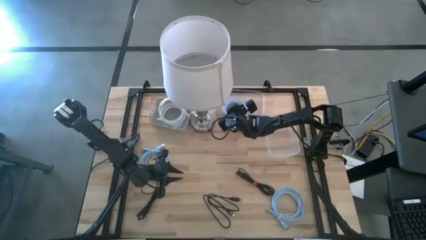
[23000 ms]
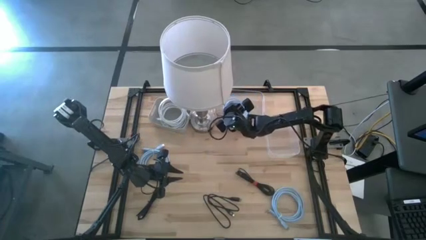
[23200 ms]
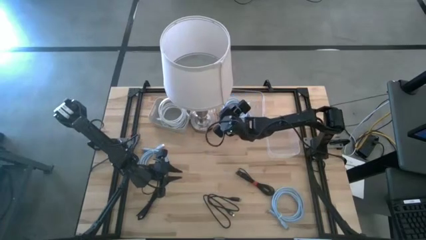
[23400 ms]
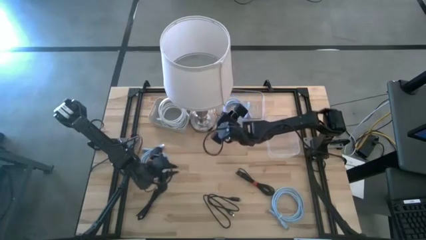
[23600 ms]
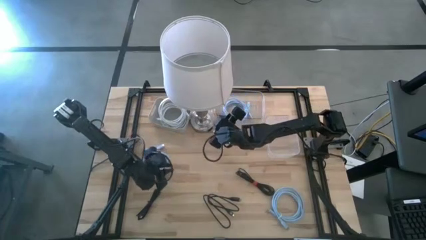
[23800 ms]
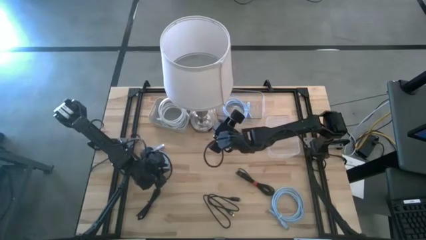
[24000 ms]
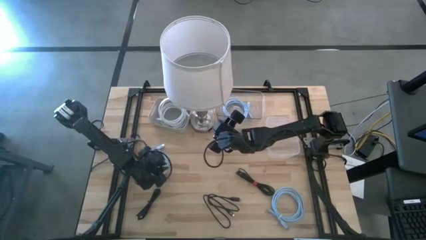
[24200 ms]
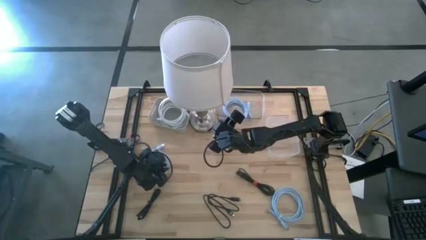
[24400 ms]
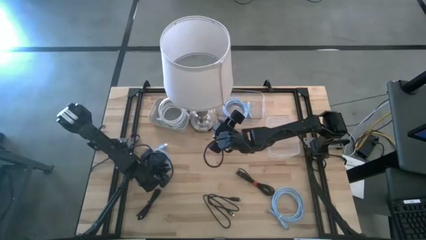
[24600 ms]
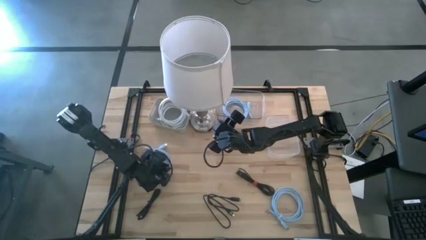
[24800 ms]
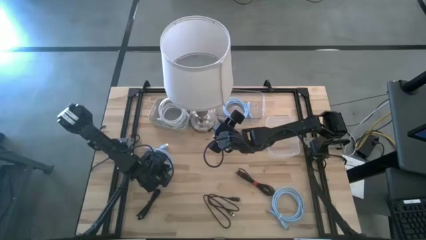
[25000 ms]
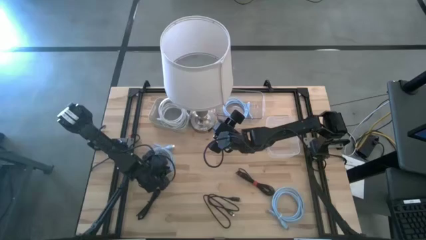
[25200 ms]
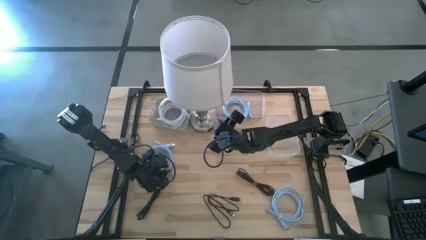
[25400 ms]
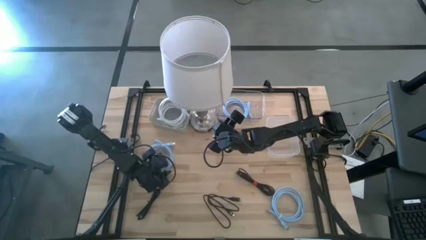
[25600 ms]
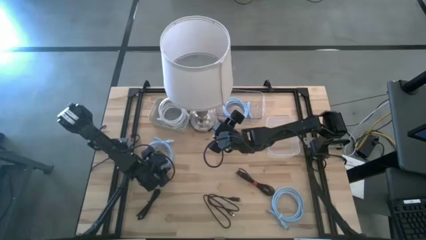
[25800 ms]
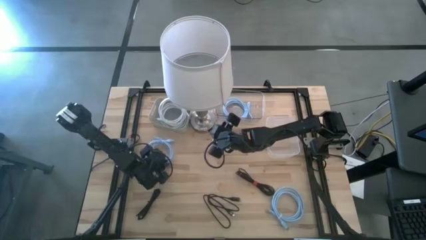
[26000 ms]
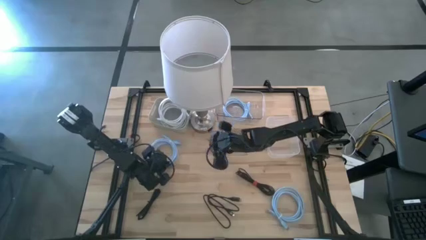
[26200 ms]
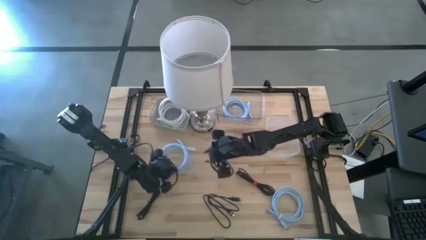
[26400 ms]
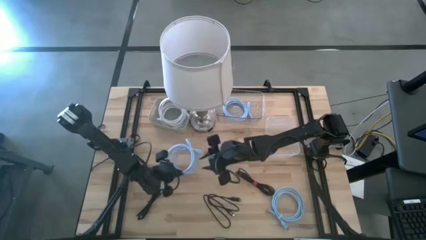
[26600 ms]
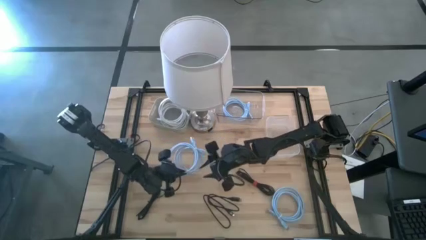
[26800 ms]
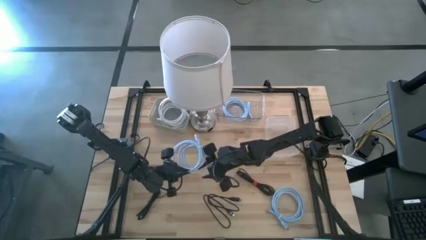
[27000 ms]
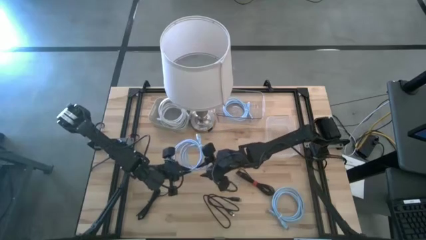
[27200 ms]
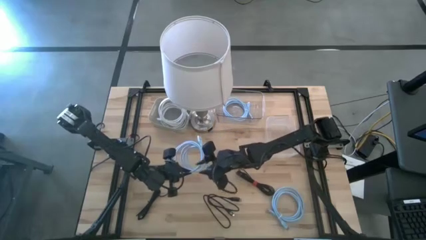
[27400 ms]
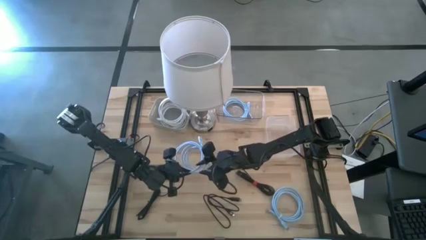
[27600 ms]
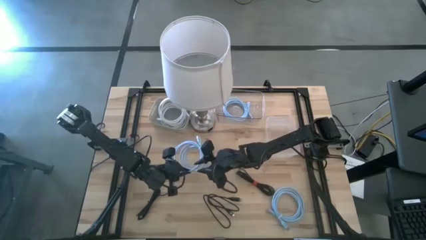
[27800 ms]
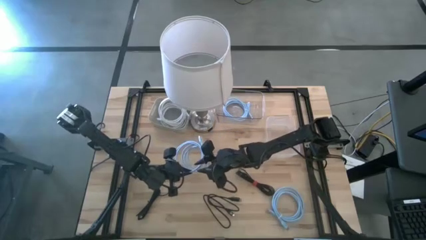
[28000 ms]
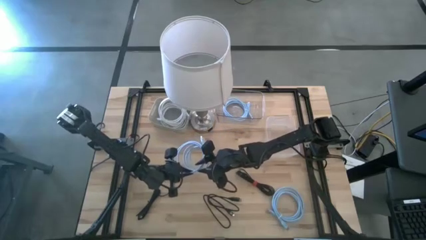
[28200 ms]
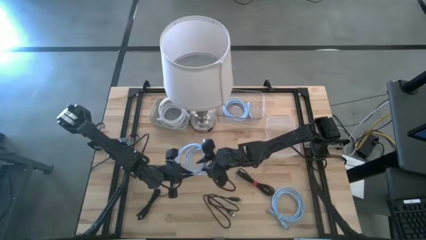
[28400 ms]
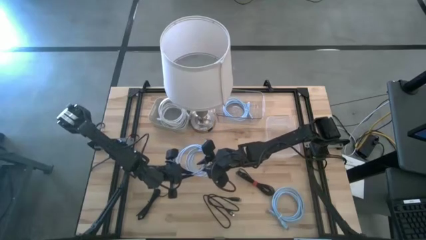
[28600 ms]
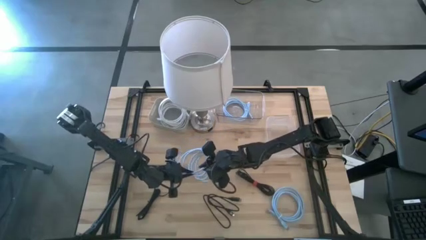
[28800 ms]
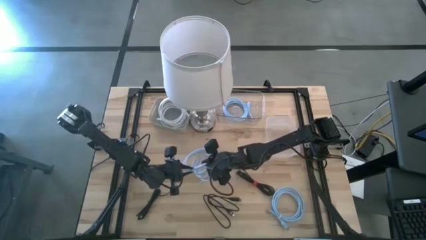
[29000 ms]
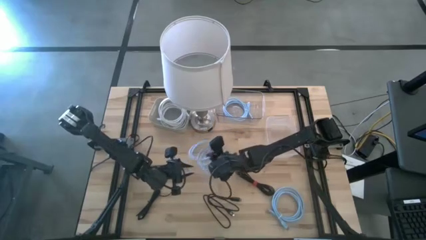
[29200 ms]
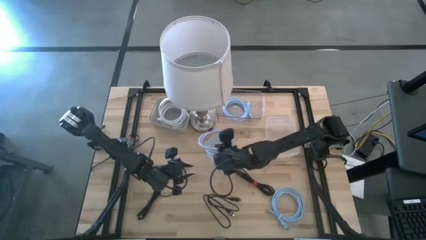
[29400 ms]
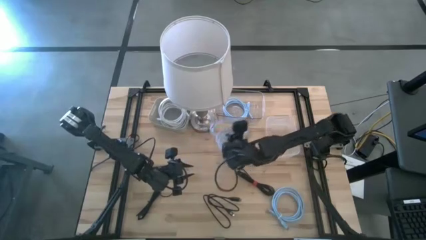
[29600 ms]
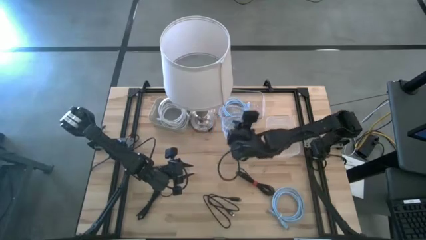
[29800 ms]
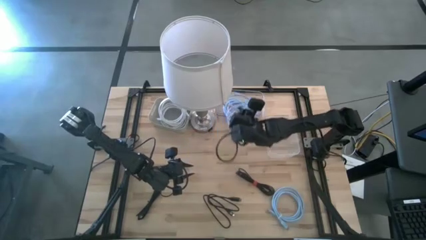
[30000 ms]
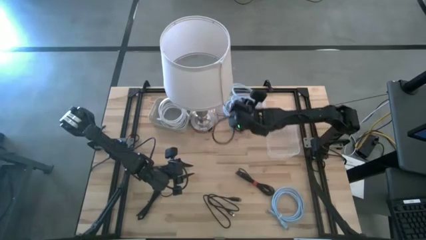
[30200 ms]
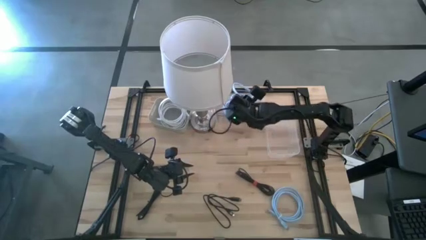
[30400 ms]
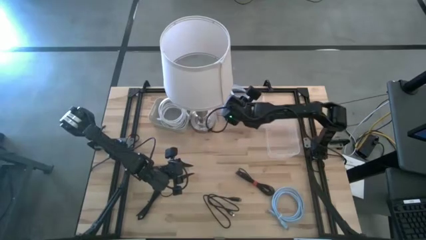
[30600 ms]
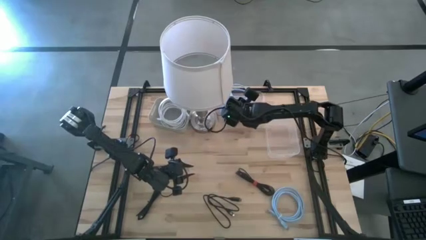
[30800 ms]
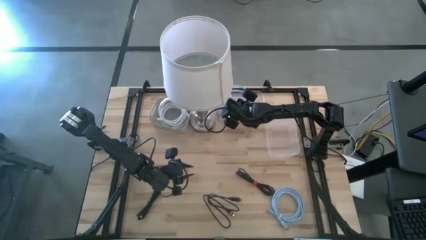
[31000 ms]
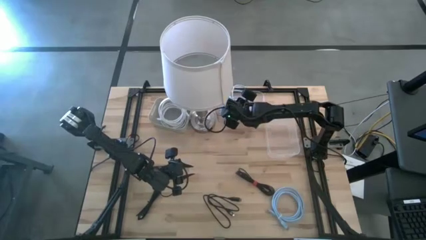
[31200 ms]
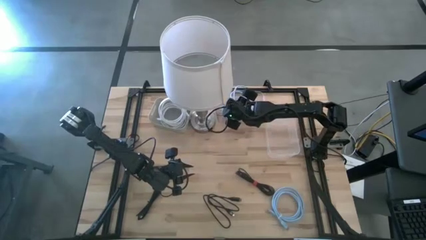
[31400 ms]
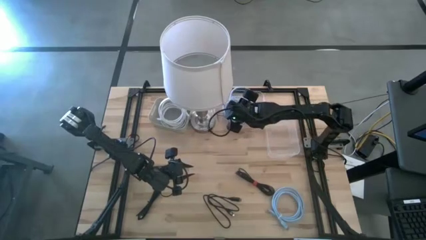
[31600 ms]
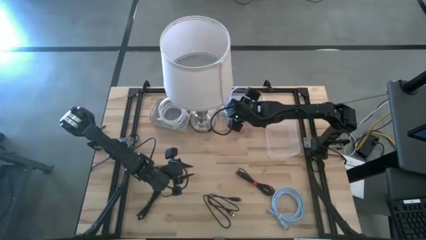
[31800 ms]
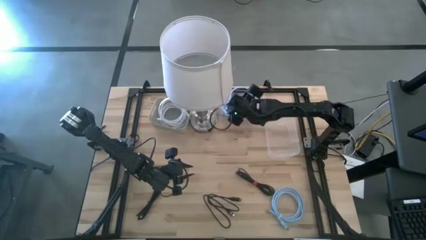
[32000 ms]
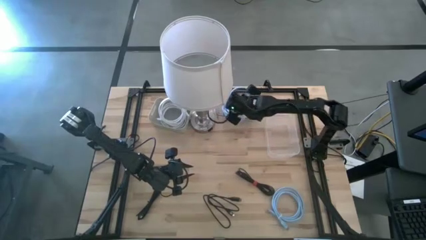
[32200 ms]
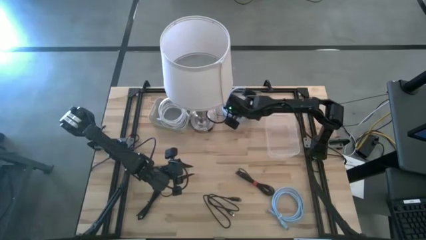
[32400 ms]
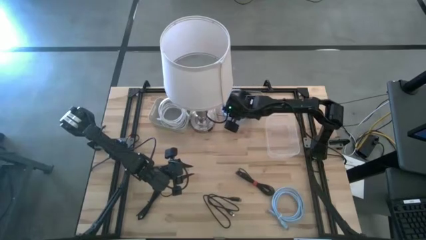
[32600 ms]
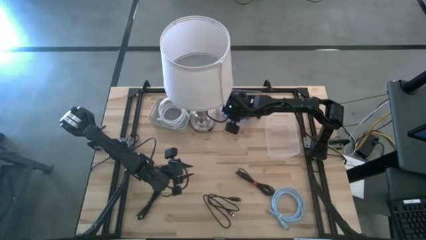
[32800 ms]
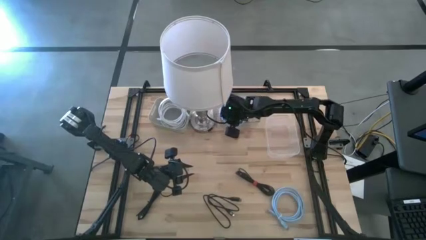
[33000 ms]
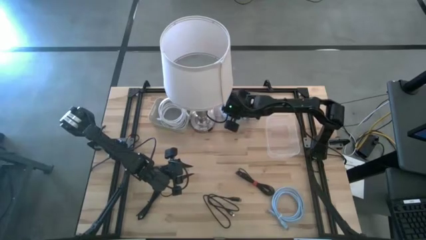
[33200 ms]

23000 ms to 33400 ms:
Task: Pick & Place USB Port
Put the left blue HDMI cable into the left transparent bin

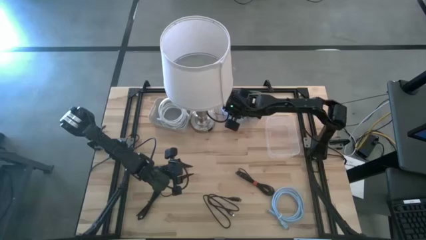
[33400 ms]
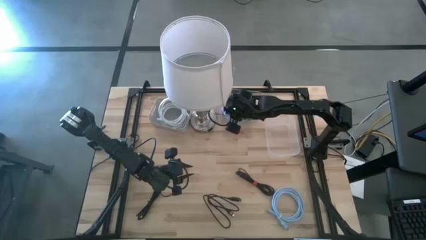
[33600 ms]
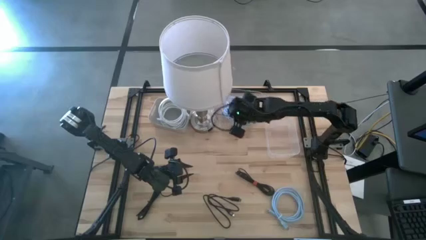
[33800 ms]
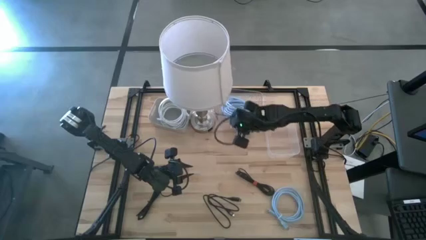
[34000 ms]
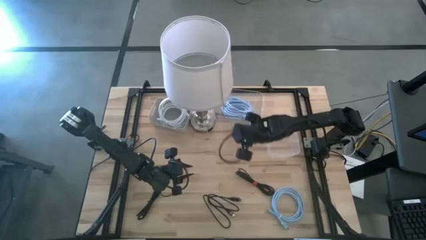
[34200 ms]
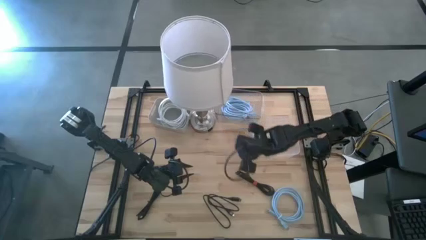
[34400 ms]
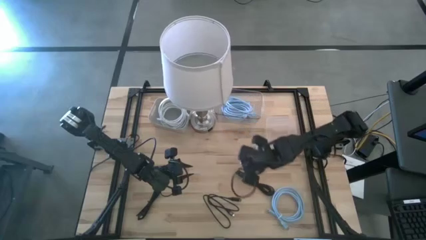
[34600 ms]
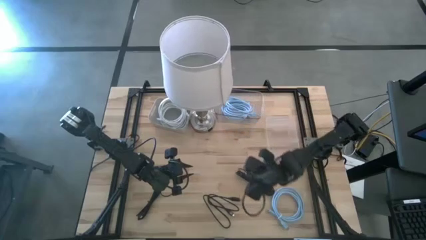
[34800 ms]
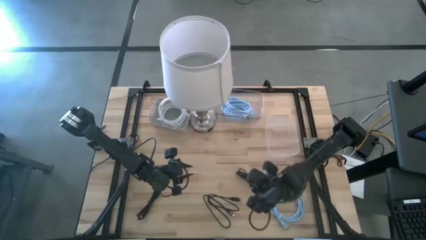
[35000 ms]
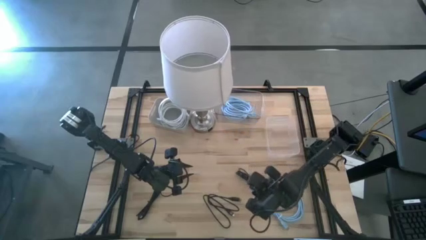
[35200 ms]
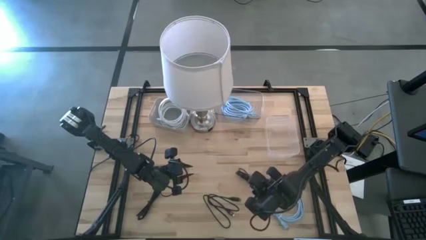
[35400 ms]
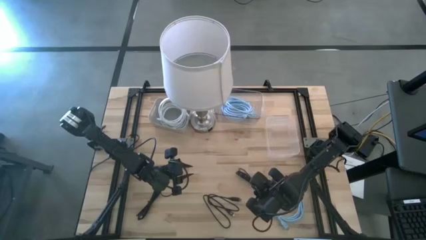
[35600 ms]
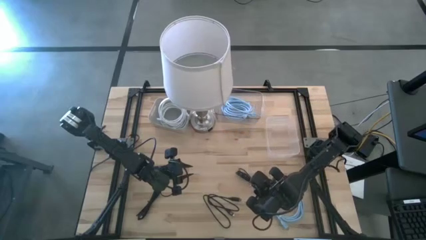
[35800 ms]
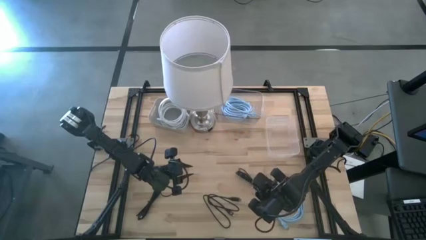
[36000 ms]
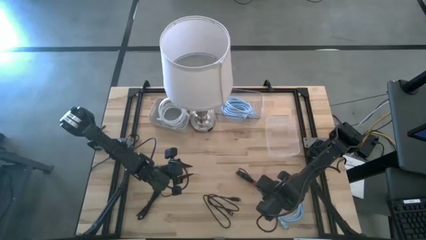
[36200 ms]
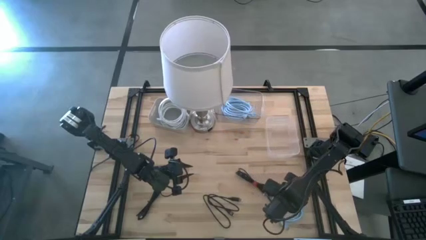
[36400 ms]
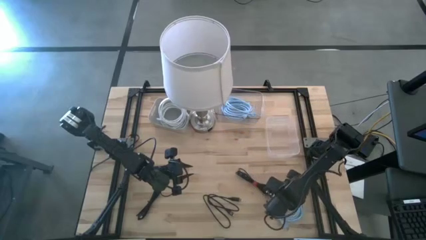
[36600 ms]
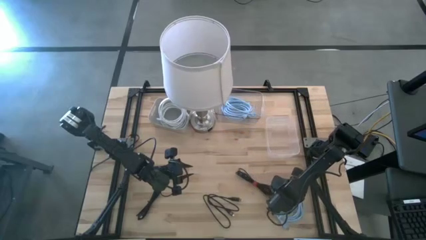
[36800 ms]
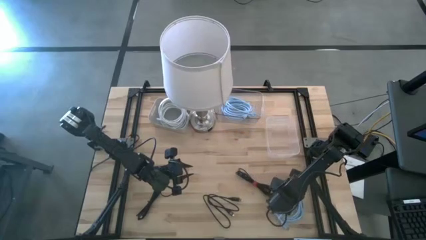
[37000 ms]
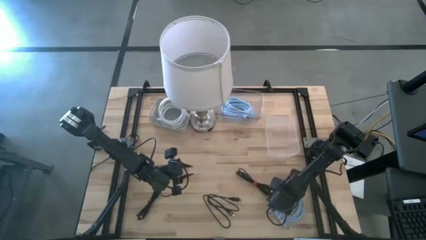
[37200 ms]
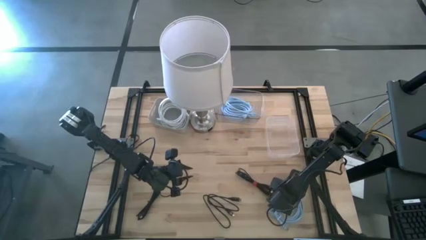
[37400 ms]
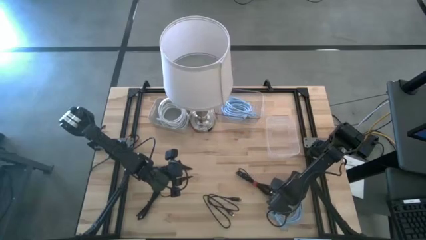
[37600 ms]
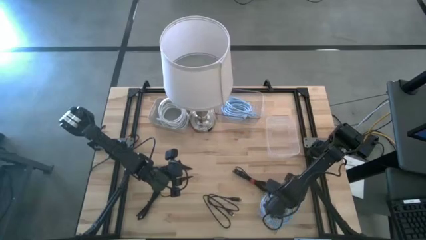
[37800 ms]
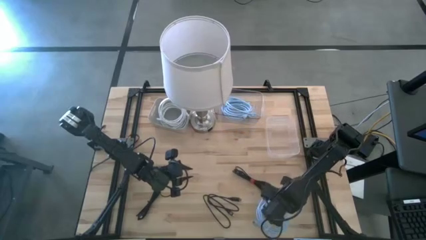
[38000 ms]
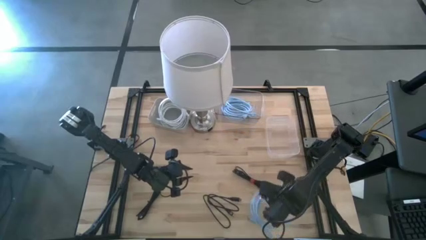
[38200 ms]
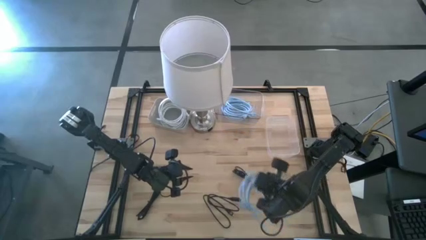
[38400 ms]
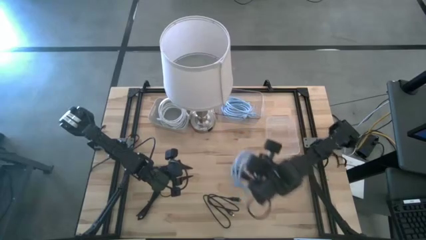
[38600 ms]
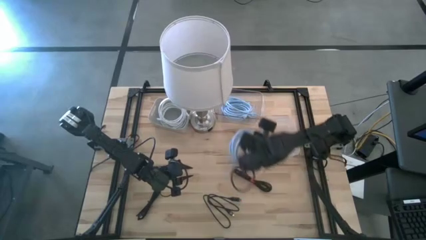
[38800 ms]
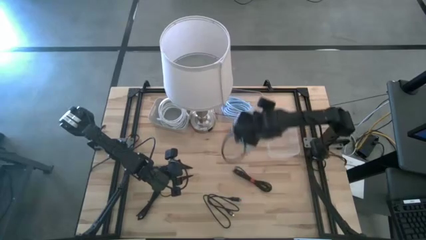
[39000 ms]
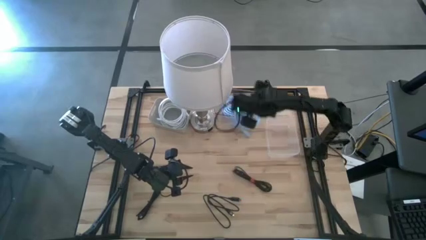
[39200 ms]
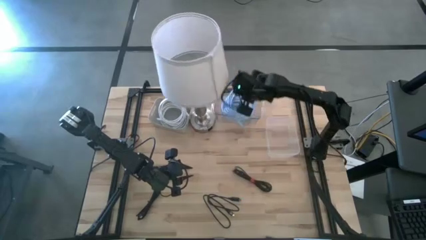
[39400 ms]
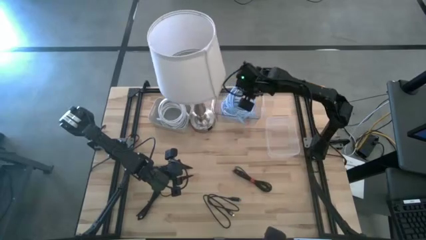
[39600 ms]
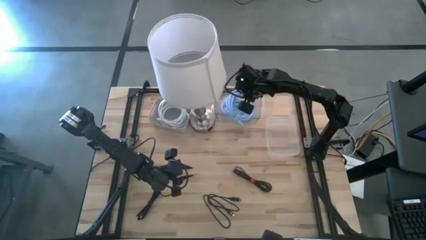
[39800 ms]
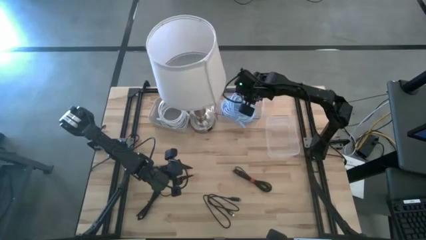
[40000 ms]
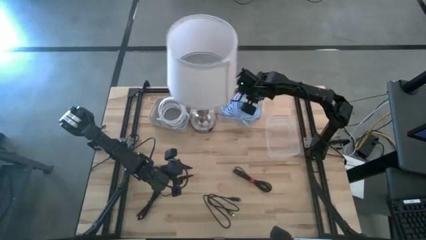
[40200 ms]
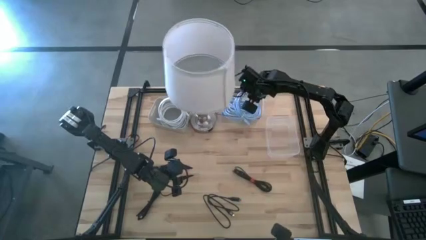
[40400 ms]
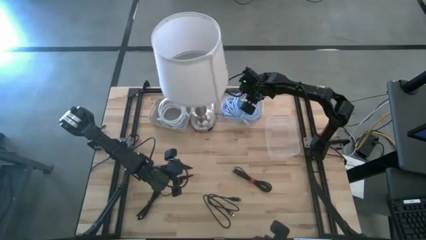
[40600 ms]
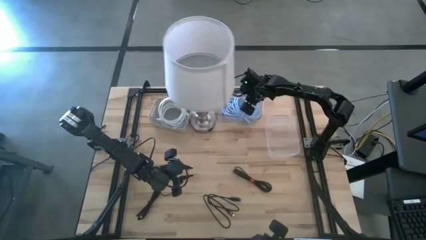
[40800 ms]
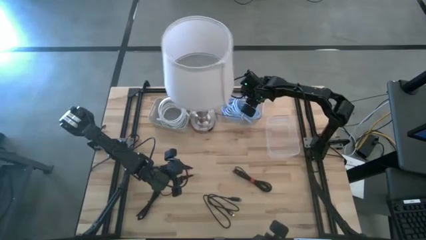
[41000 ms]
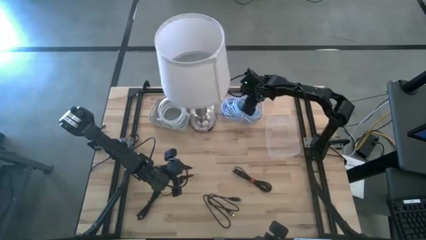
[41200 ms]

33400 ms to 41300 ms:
Put the blue HDMI cable into the left transparent bin
